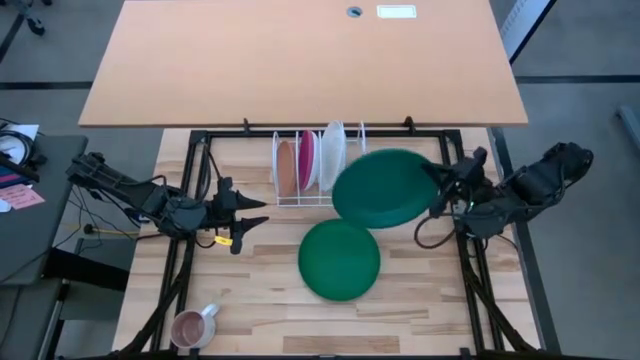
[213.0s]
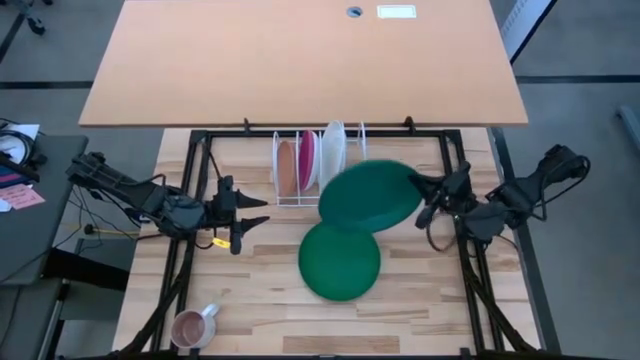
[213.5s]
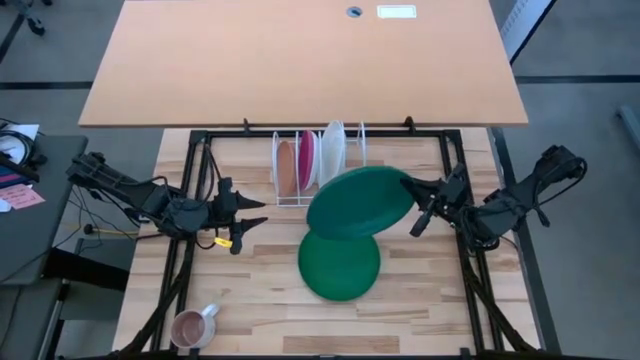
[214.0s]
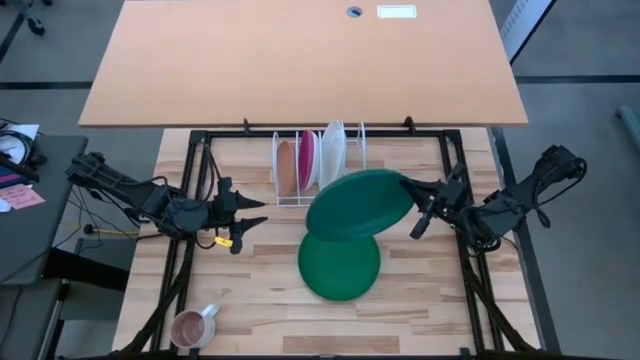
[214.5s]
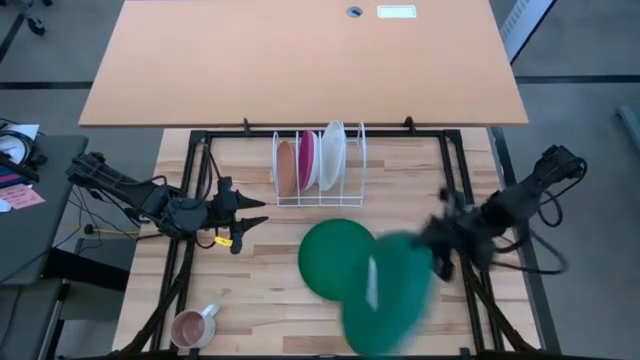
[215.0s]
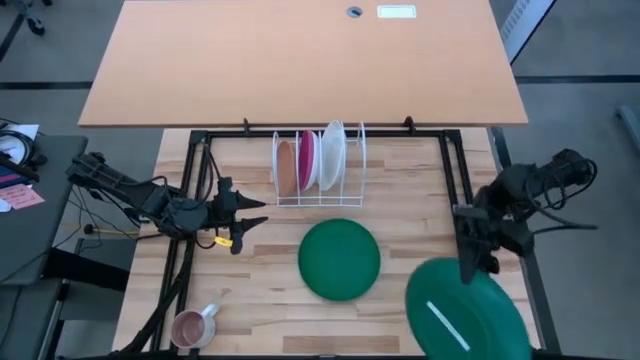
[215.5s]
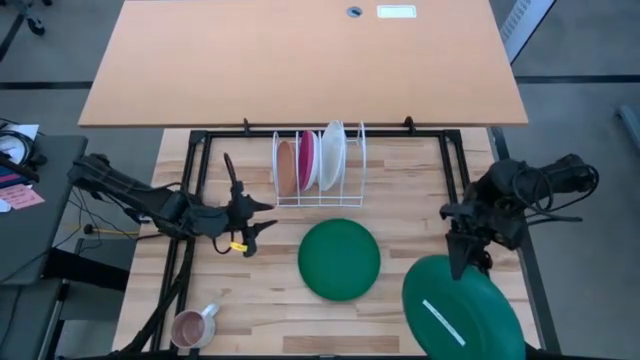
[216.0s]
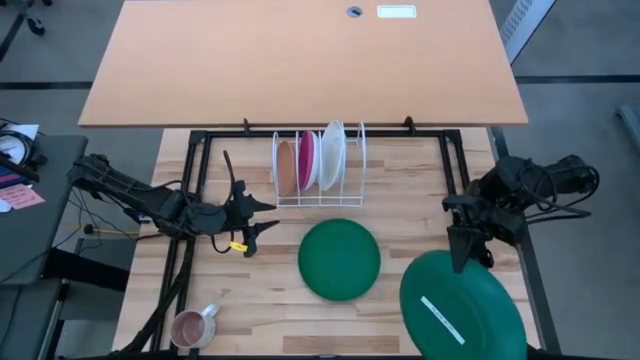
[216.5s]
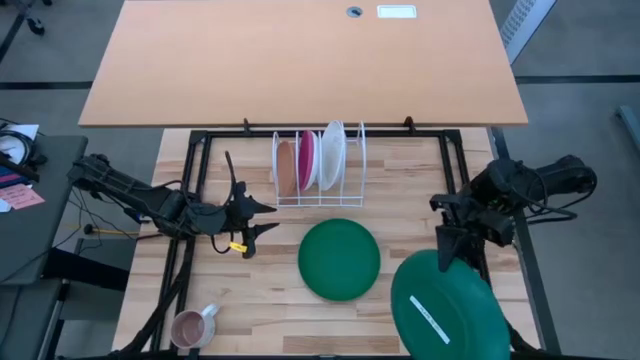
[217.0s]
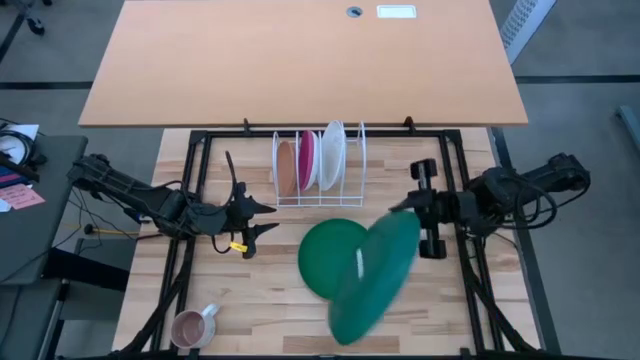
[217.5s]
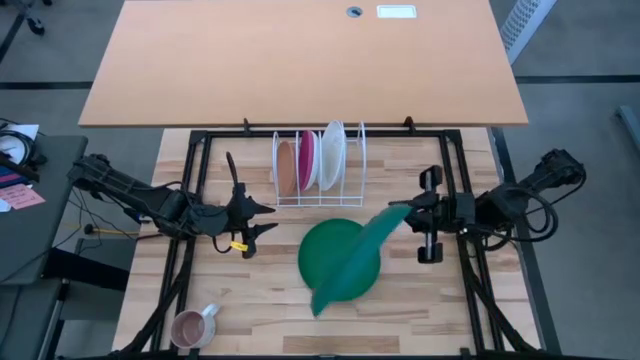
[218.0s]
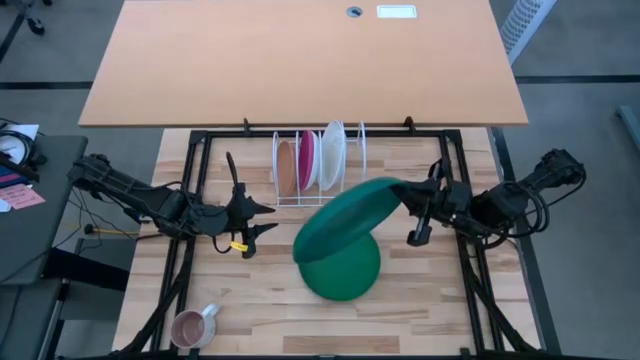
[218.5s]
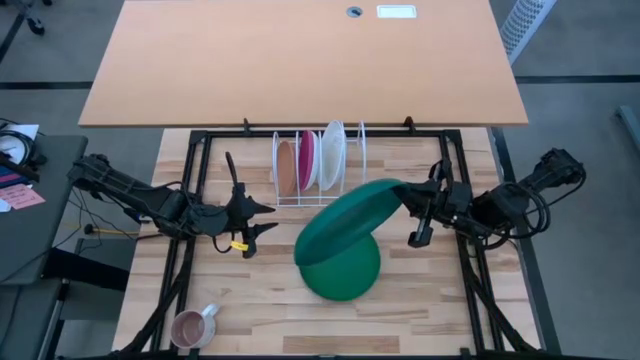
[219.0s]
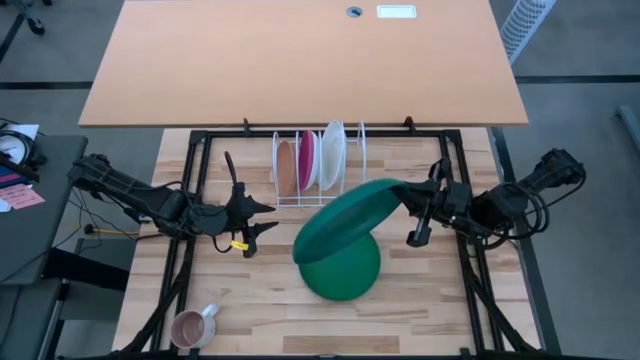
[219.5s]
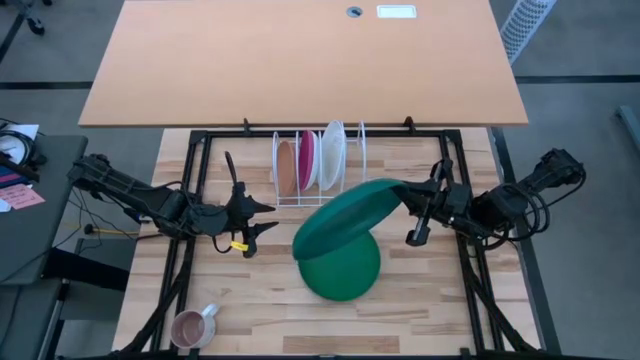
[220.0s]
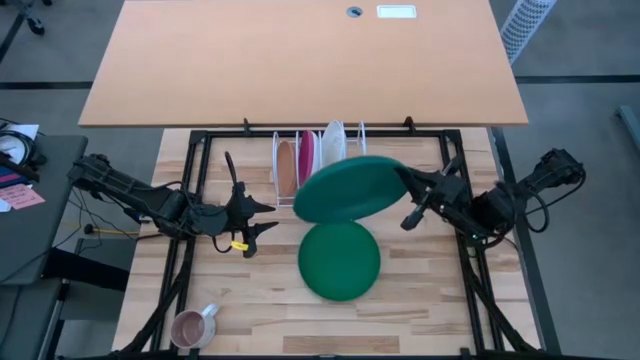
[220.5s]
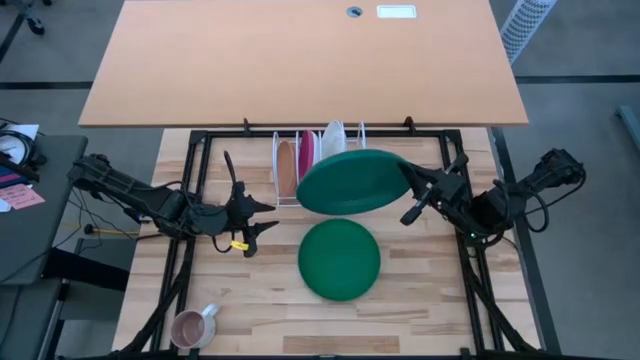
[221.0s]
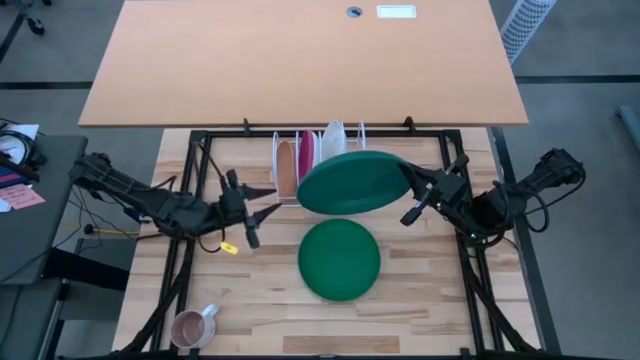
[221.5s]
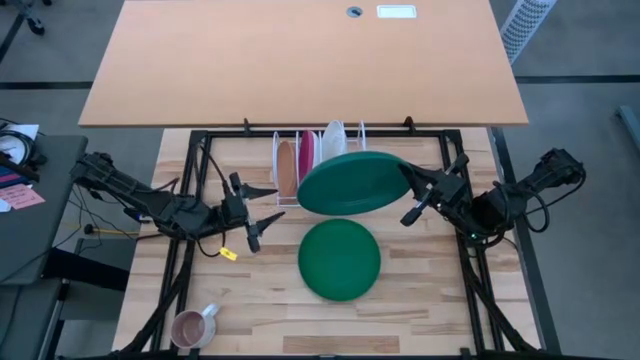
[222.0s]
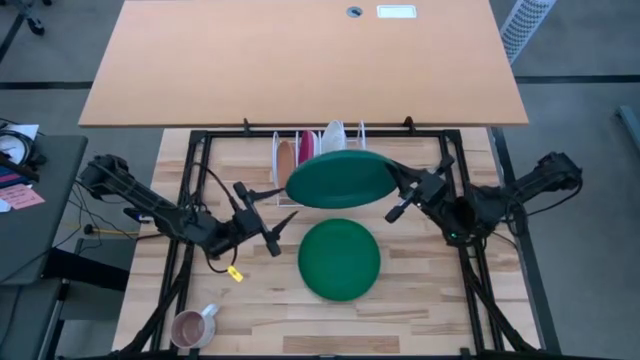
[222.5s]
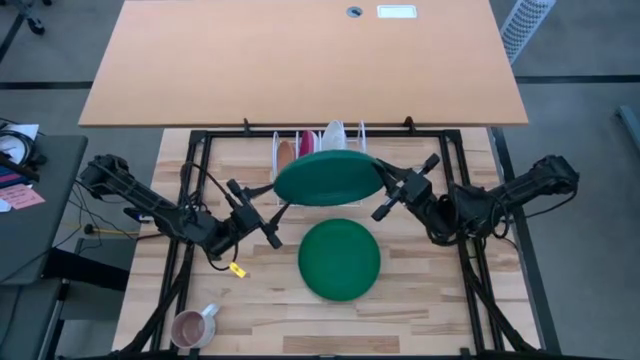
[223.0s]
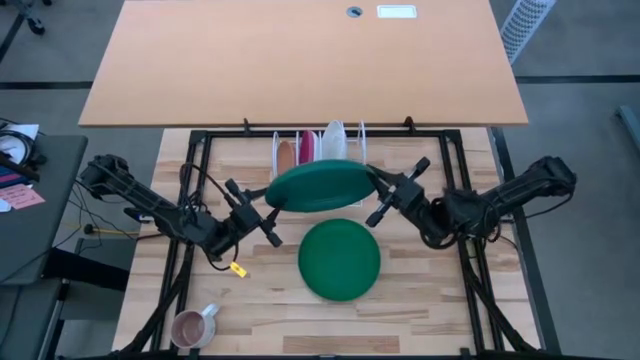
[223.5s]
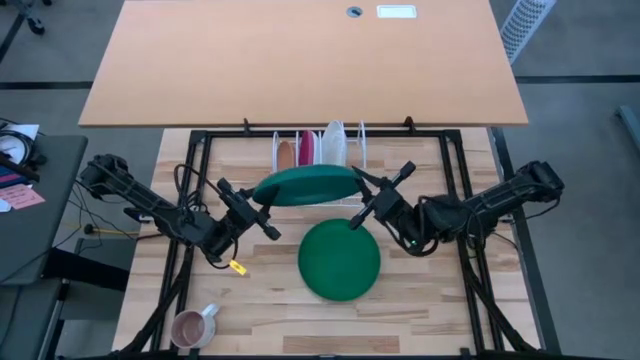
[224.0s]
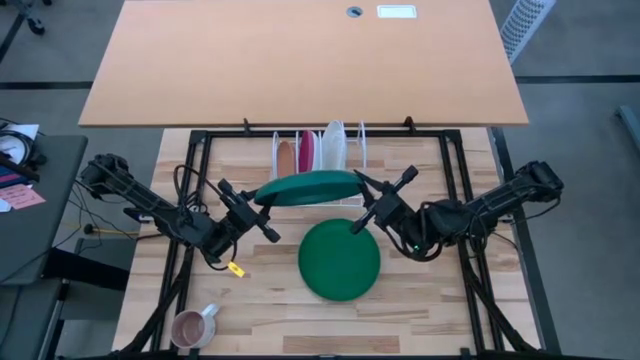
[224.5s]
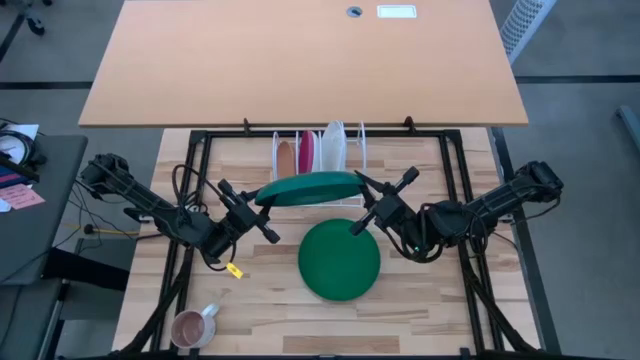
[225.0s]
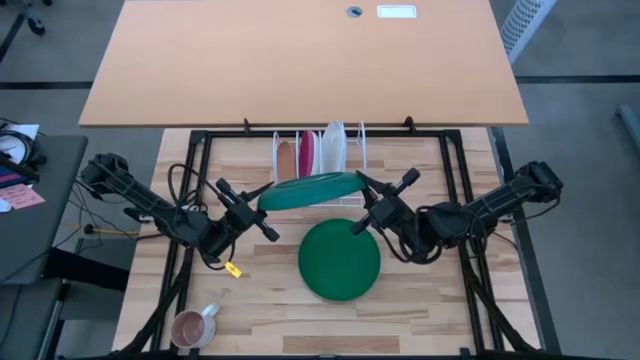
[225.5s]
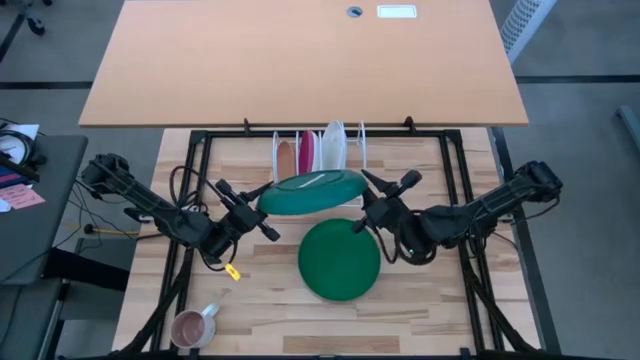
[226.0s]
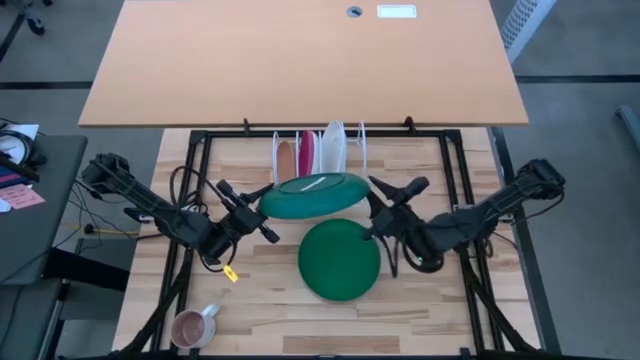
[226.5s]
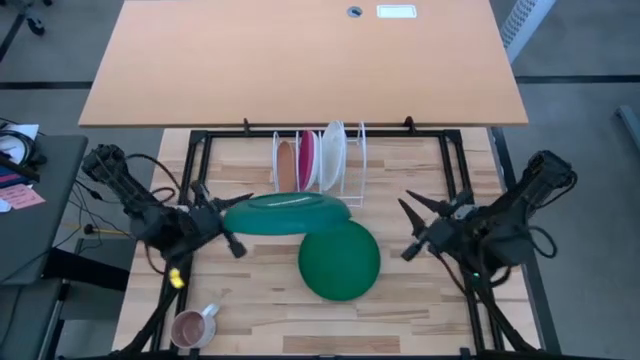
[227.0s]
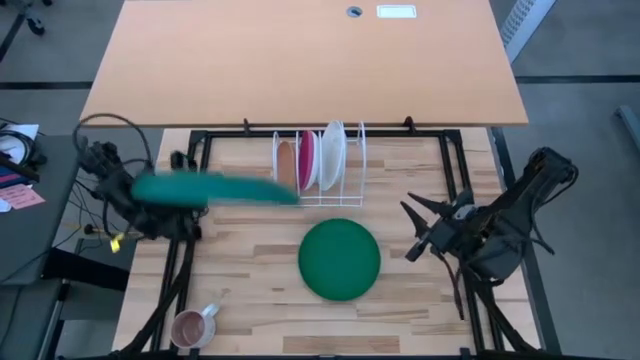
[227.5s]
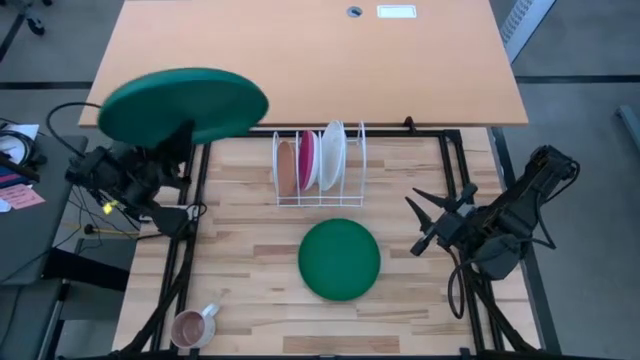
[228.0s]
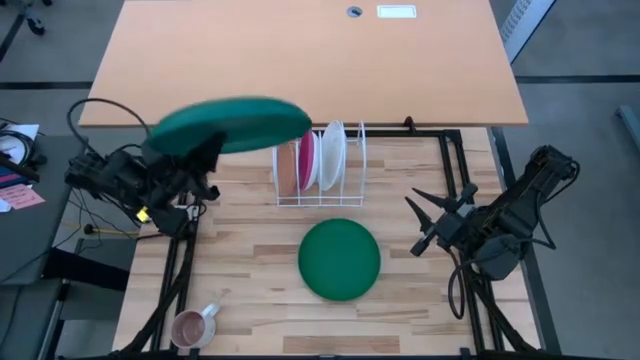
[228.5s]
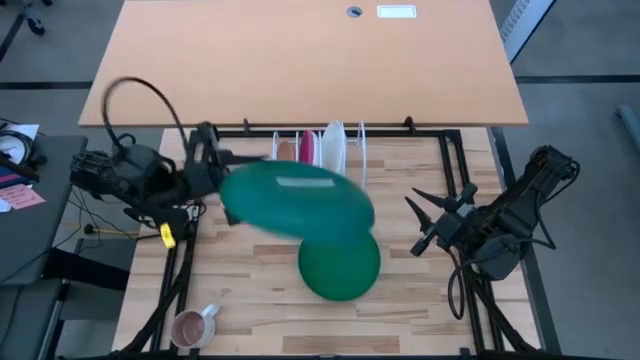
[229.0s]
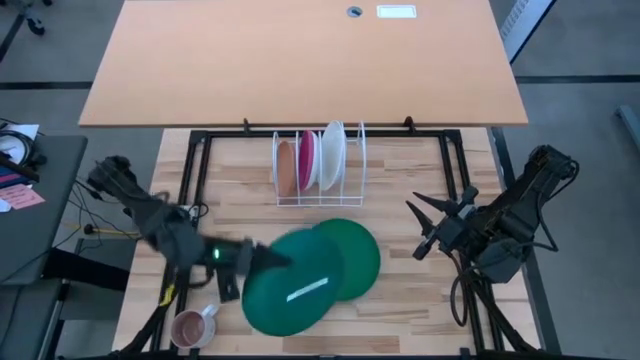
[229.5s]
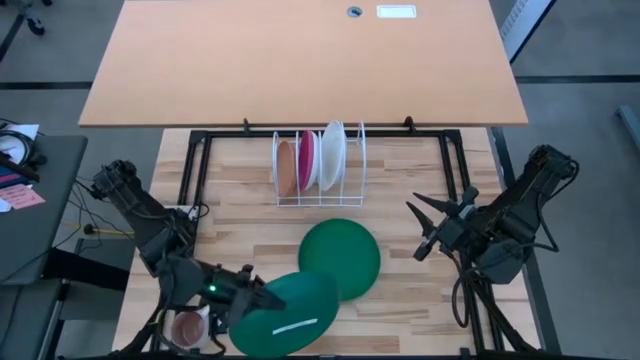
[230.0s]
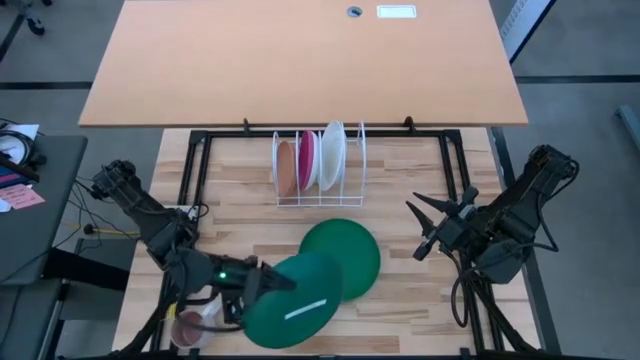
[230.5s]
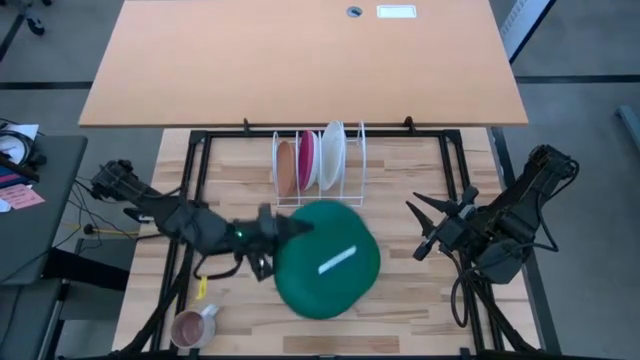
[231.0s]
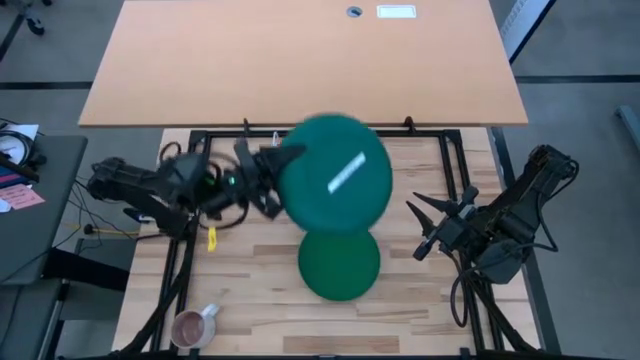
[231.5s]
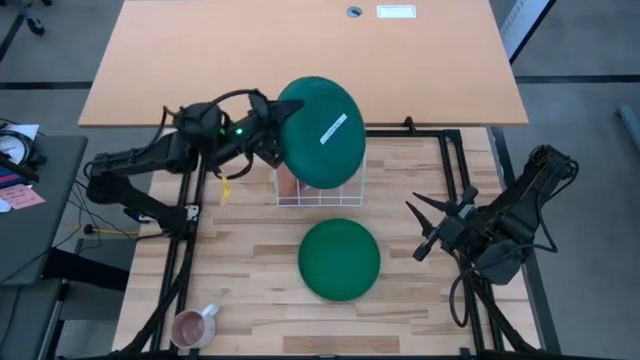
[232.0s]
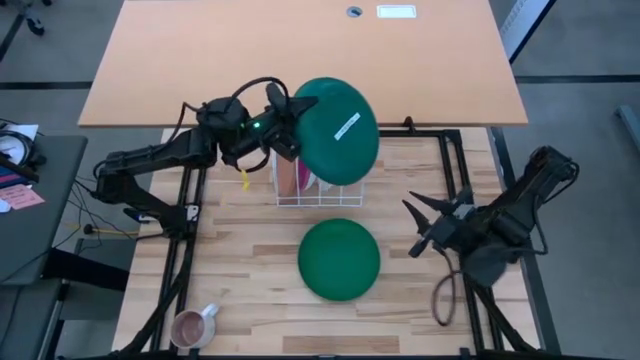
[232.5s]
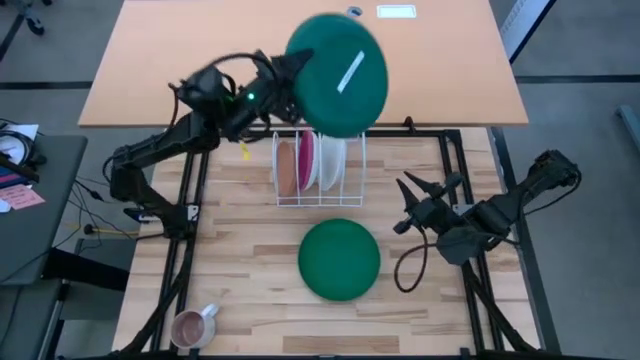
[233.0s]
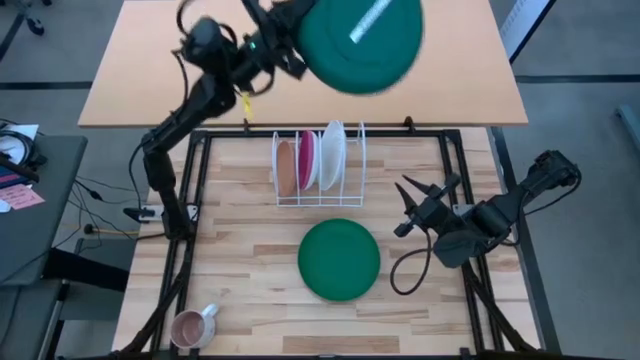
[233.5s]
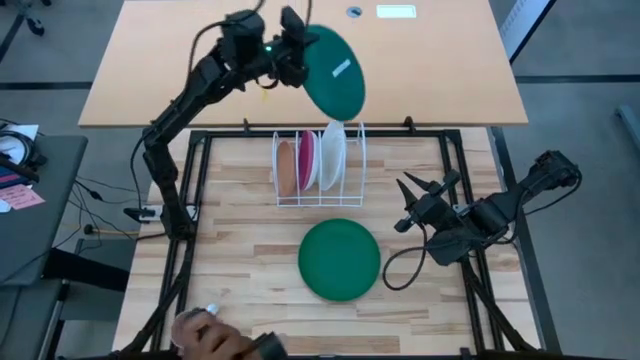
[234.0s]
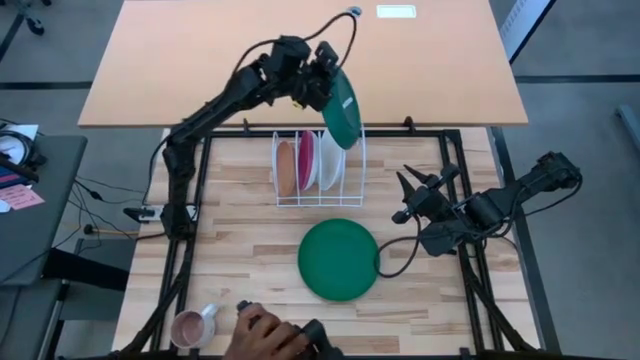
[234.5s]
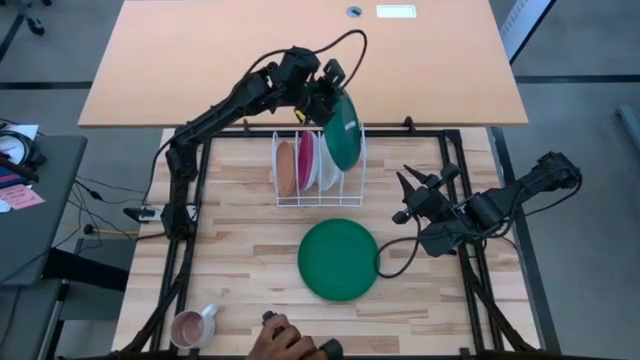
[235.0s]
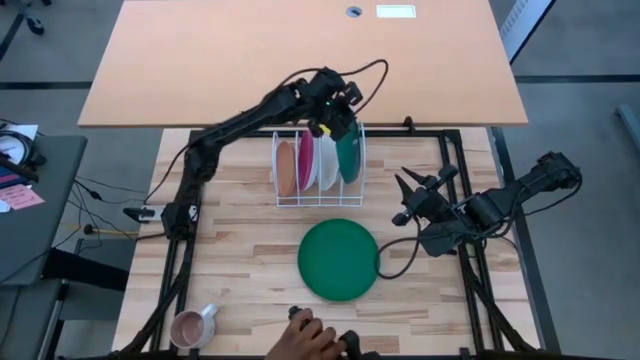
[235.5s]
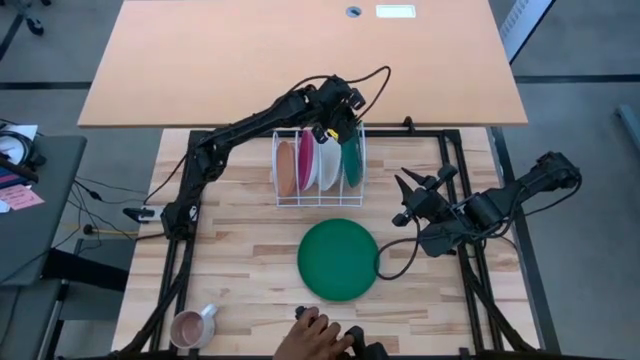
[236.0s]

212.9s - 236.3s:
Task: Sort dishes
Put the dark green plate in the dish rack
